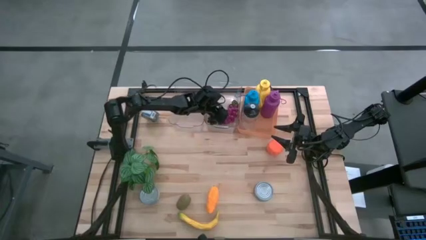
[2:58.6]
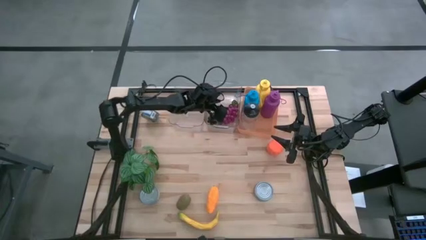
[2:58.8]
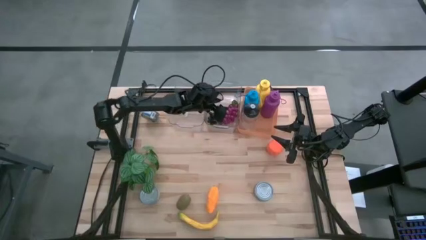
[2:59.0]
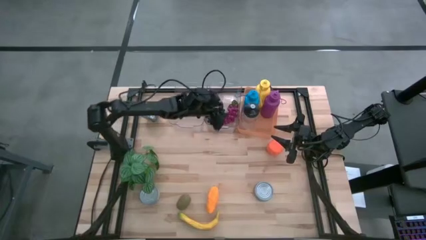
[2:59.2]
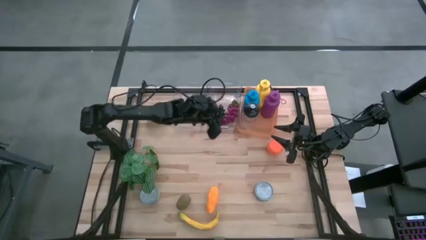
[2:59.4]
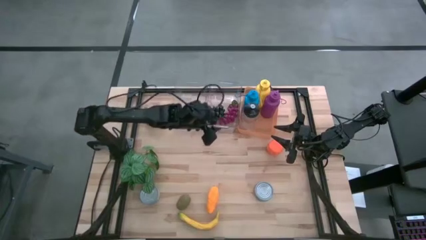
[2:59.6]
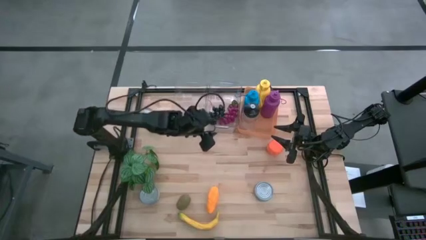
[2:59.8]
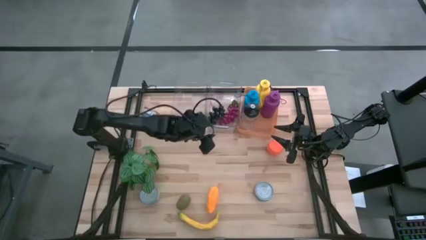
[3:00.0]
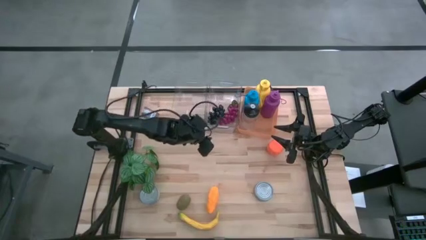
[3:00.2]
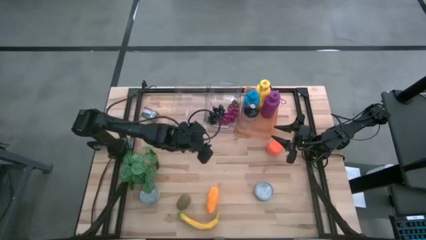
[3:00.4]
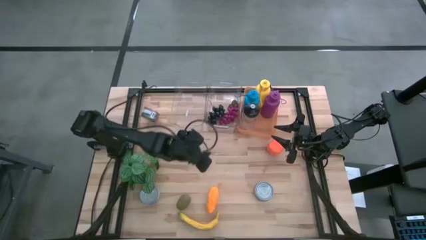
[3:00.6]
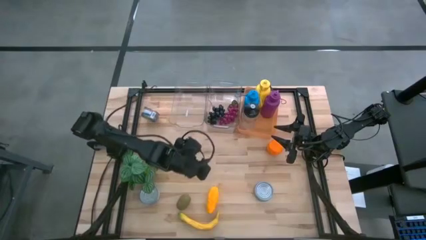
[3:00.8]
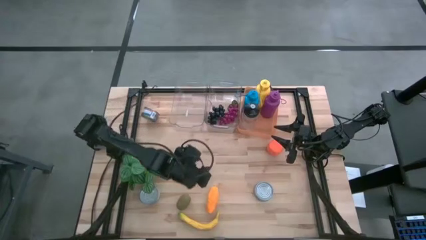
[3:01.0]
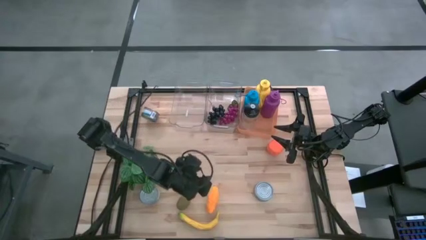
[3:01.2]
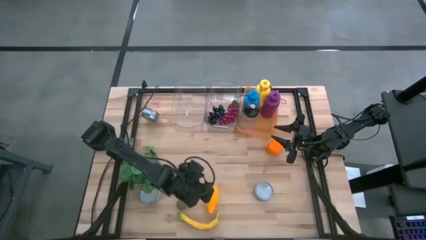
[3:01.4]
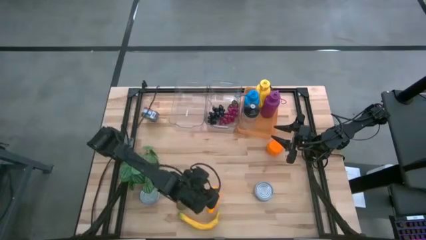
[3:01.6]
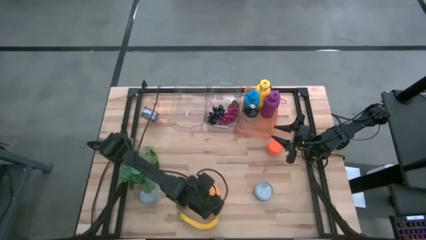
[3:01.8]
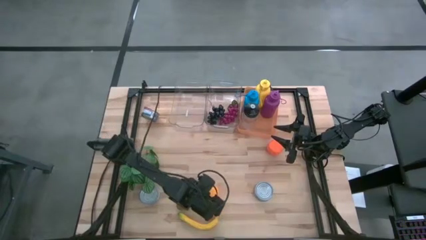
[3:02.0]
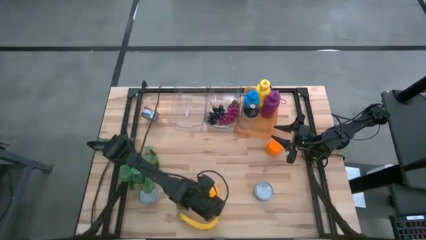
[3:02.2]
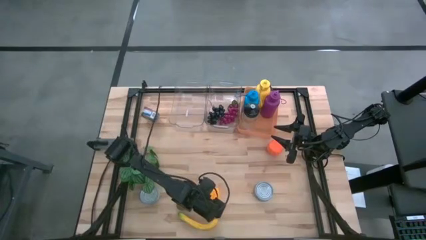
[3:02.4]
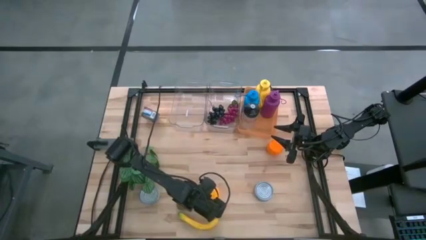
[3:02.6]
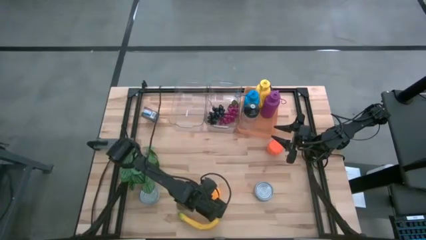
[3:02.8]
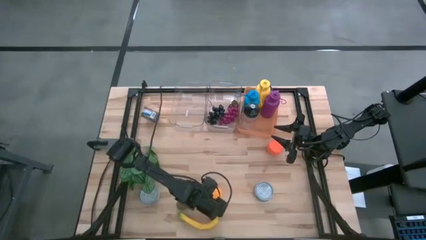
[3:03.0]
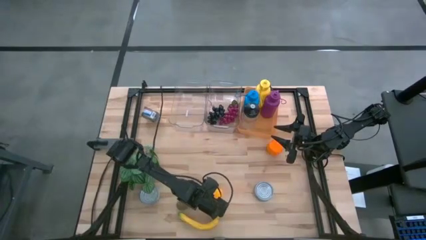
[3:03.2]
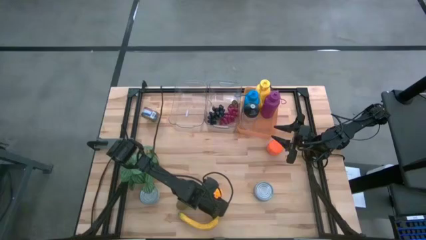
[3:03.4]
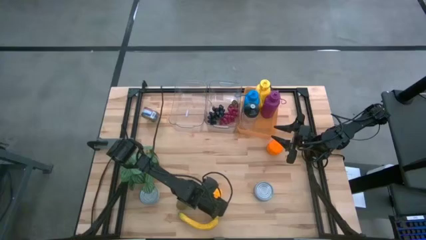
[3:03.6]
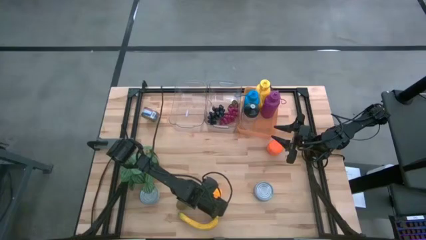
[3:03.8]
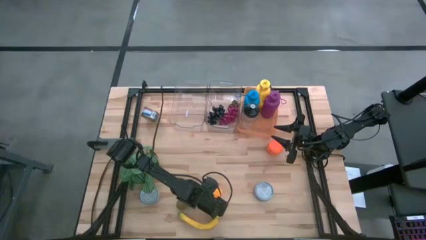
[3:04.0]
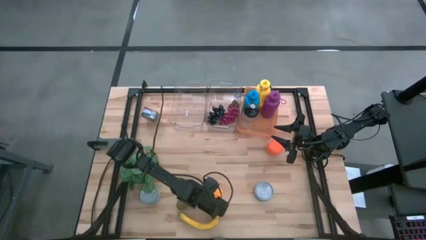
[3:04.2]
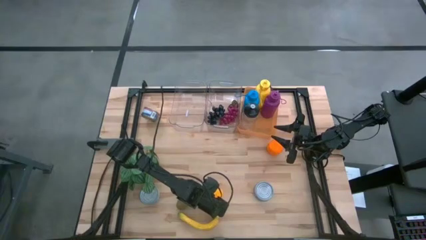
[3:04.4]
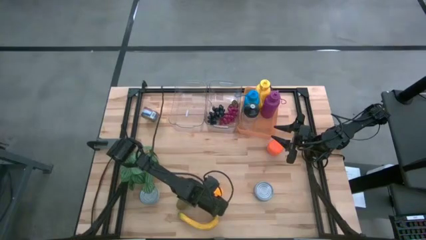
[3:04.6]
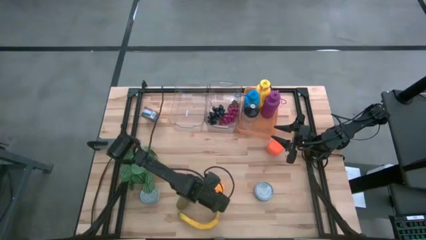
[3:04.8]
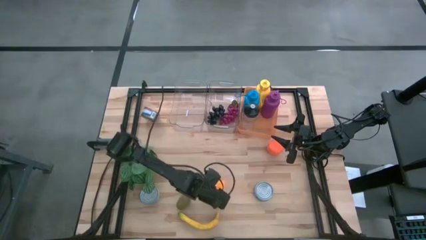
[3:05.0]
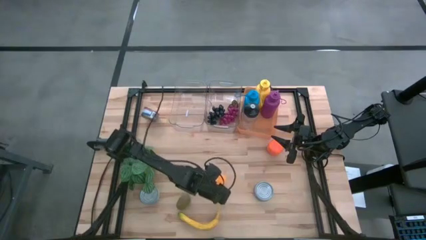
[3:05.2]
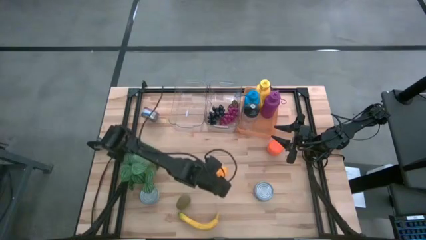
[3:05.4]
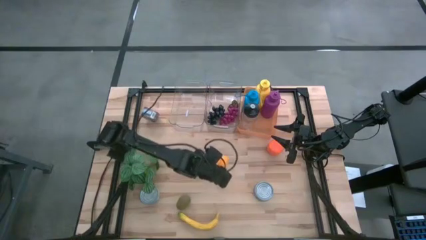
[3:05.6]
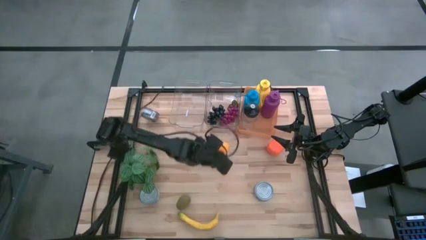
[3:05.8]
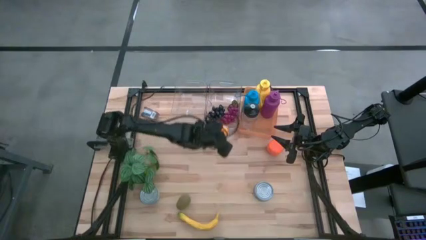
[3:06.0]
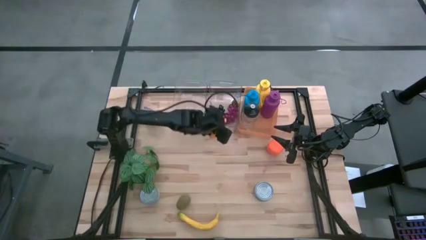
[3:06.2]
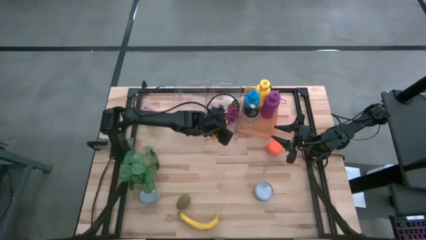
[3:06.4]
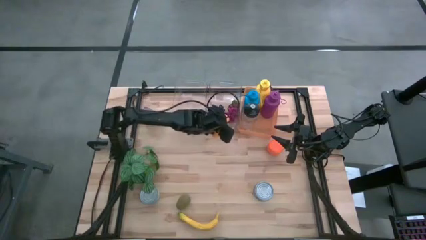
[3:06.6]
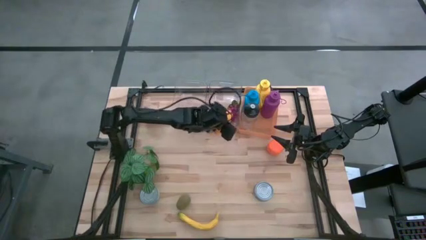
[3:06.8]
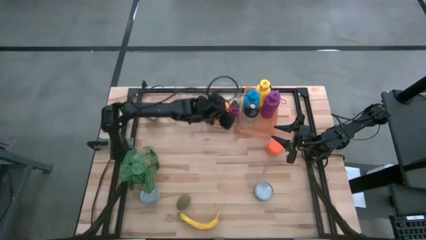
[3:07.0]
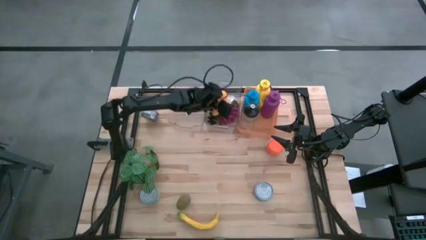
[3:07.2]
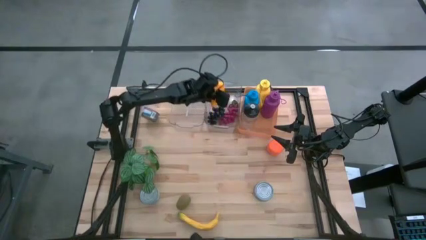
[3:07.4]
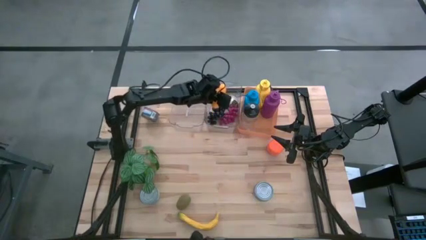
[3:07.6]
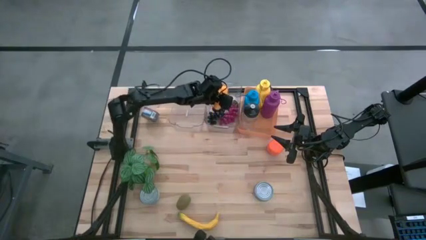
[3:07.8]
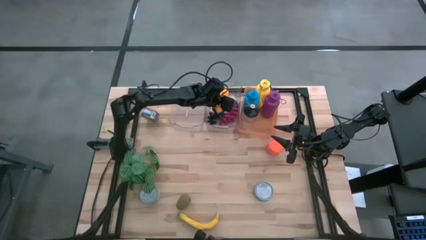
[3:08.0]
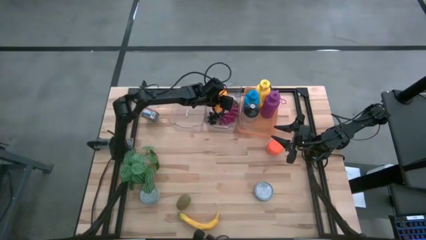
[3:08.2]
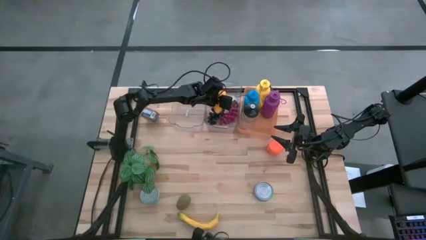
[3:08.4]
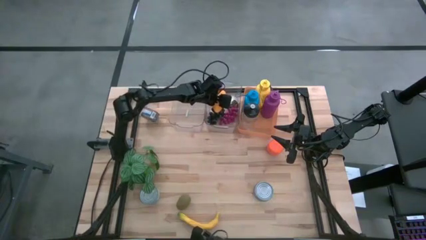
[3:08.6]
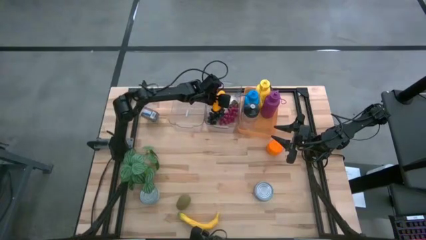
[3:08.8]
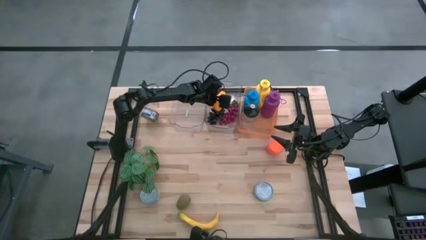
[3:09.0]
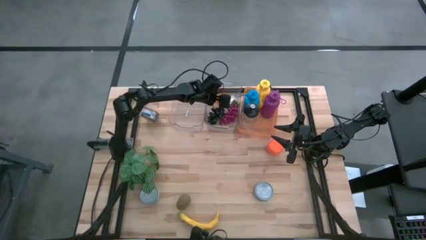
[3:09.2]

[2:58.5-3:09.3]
Task: Pick & Place Food Item
Put the yellow mango into the right transparent bin
